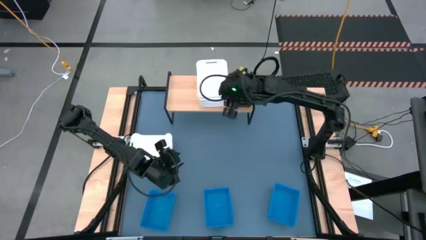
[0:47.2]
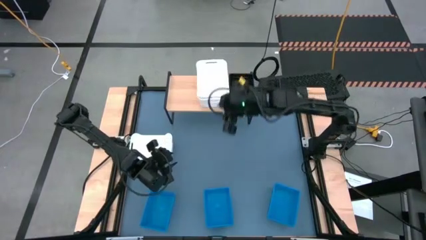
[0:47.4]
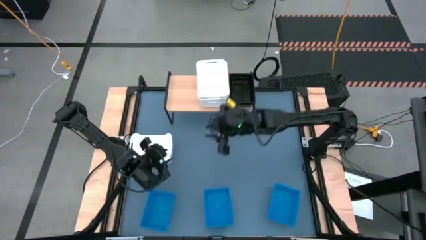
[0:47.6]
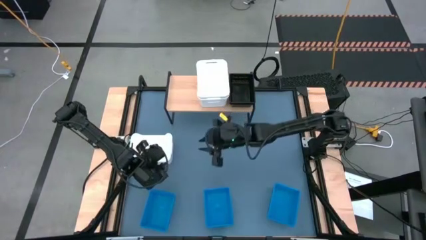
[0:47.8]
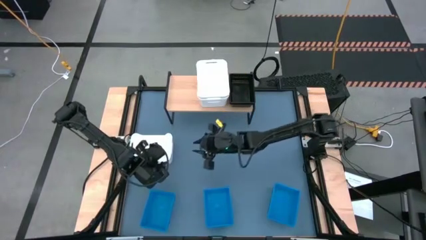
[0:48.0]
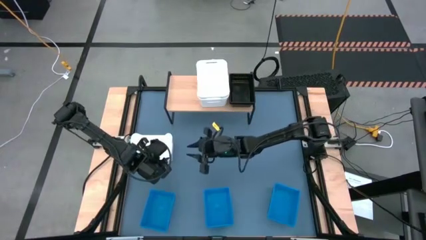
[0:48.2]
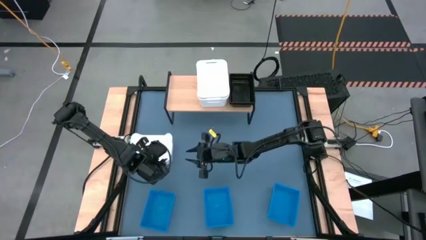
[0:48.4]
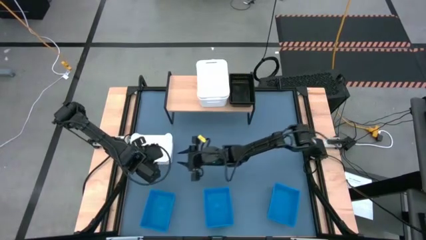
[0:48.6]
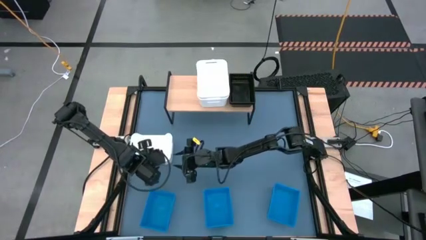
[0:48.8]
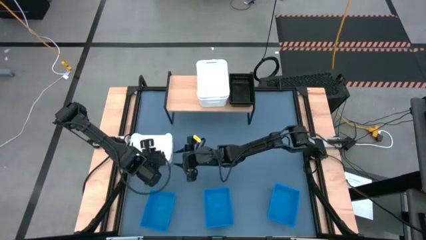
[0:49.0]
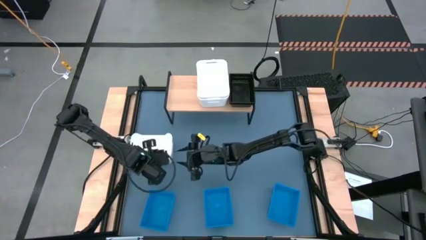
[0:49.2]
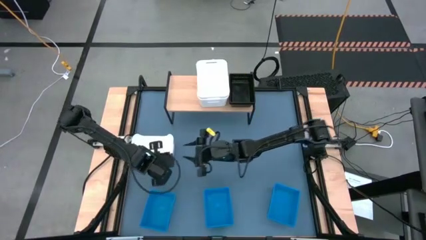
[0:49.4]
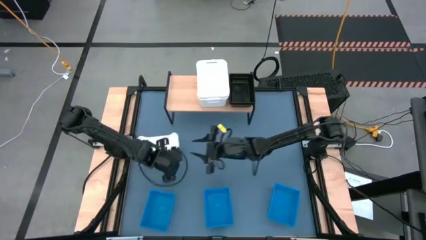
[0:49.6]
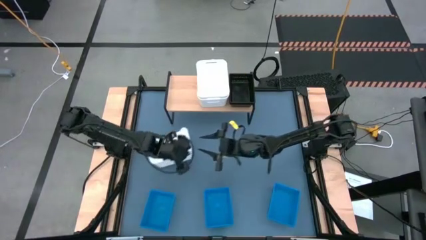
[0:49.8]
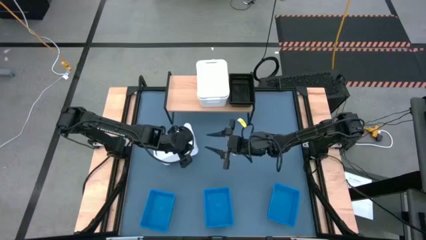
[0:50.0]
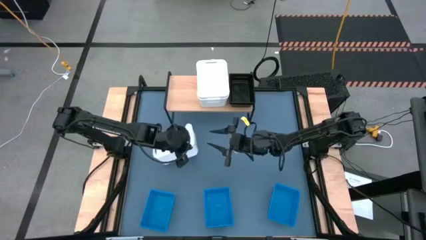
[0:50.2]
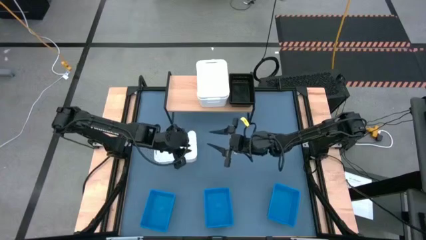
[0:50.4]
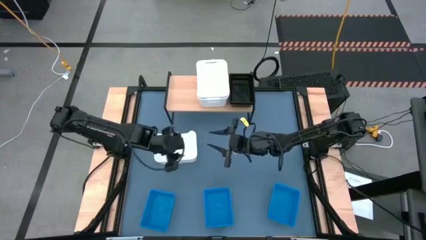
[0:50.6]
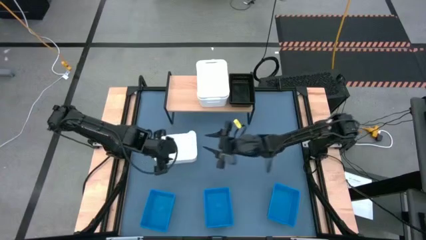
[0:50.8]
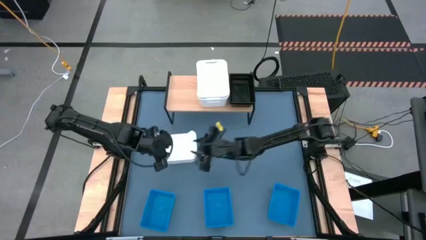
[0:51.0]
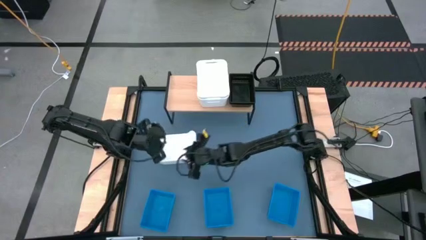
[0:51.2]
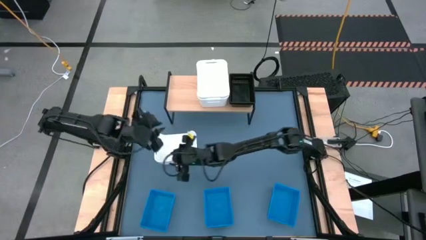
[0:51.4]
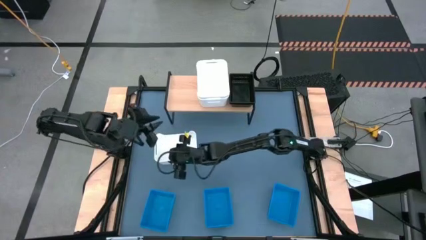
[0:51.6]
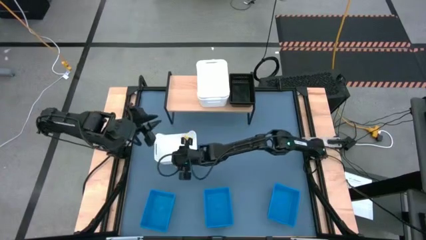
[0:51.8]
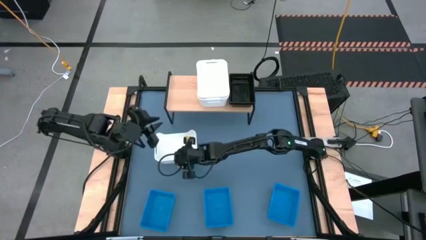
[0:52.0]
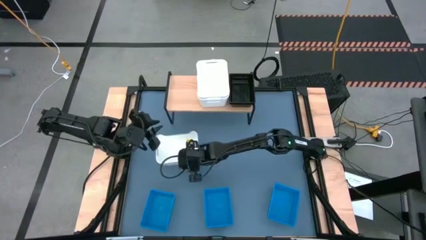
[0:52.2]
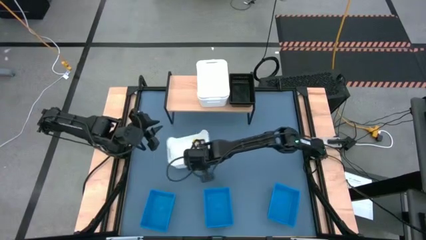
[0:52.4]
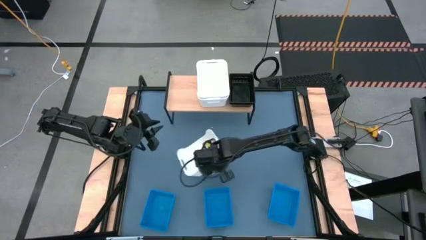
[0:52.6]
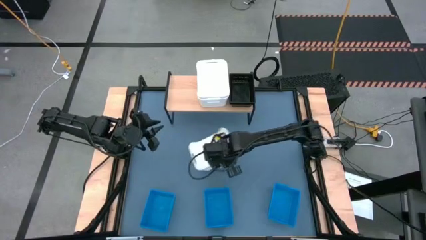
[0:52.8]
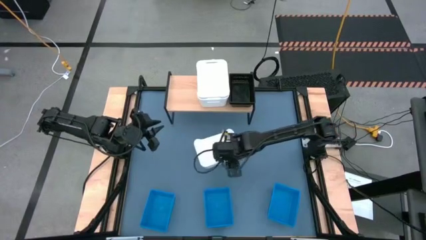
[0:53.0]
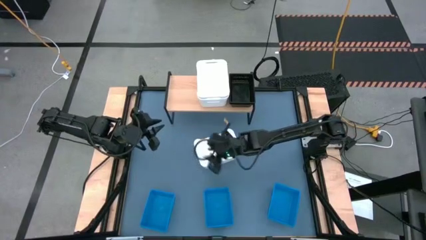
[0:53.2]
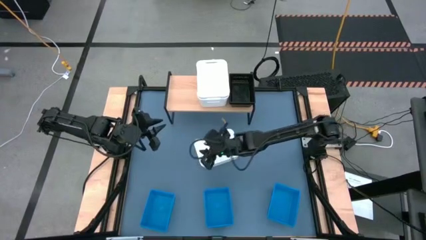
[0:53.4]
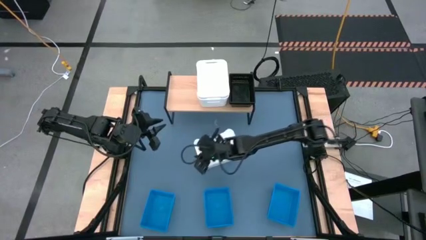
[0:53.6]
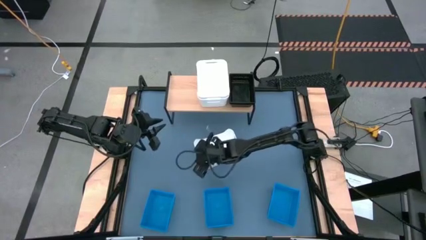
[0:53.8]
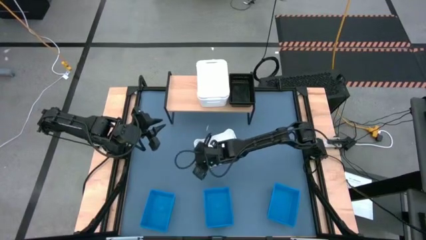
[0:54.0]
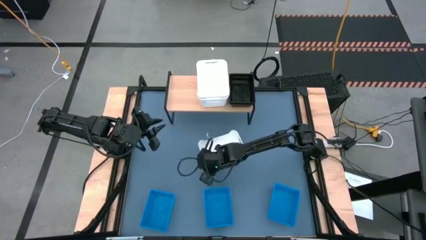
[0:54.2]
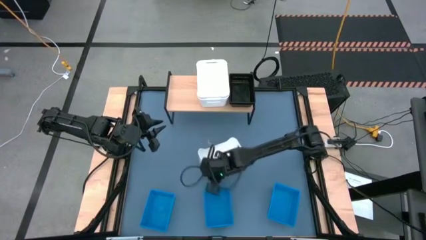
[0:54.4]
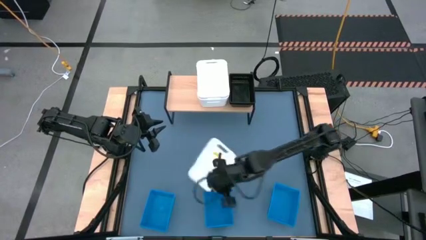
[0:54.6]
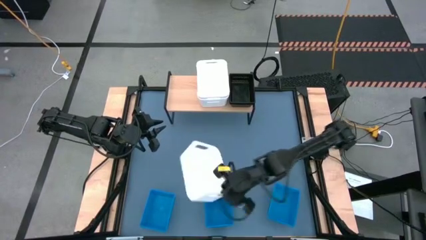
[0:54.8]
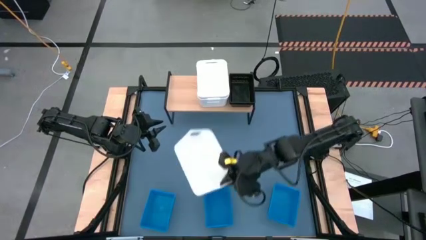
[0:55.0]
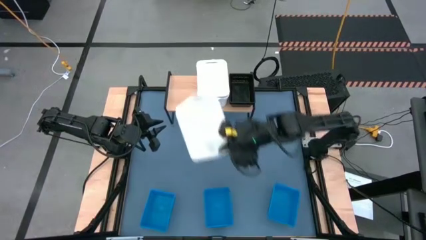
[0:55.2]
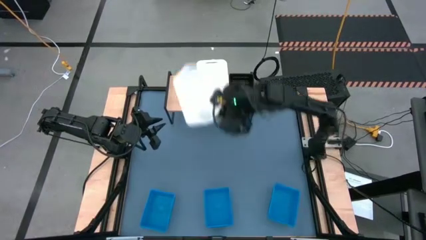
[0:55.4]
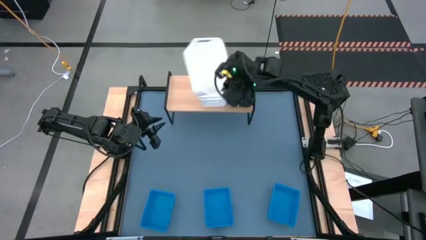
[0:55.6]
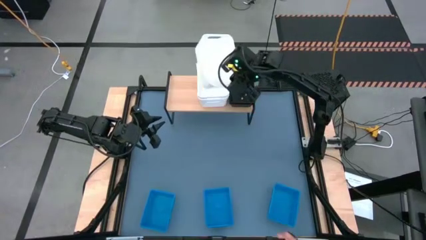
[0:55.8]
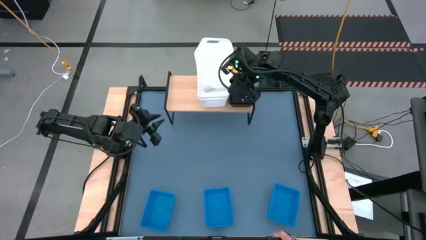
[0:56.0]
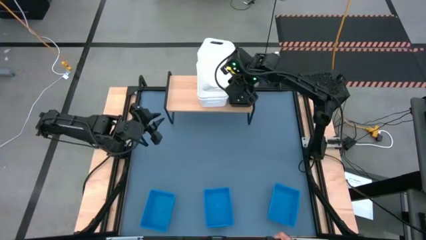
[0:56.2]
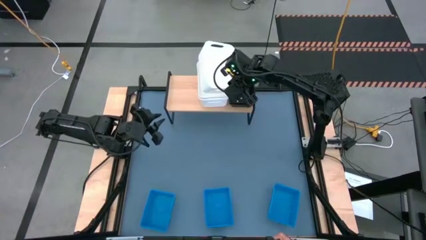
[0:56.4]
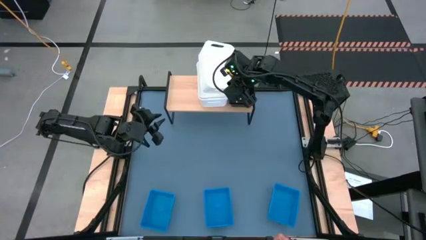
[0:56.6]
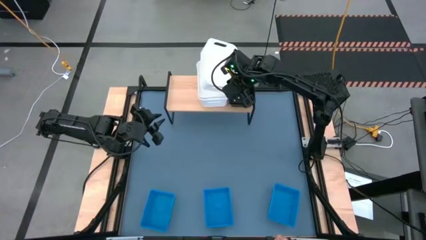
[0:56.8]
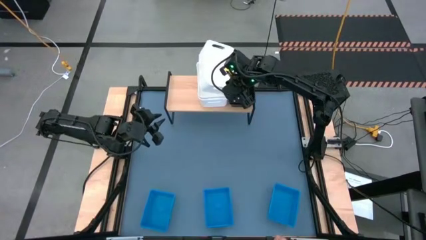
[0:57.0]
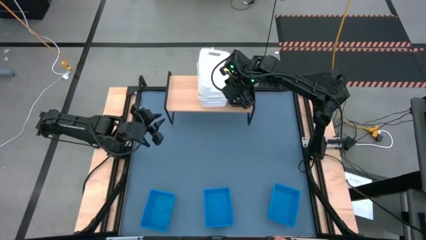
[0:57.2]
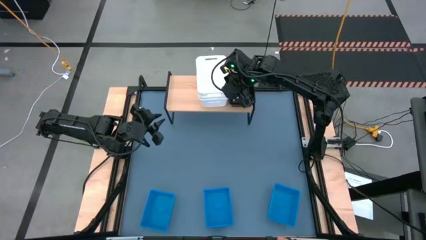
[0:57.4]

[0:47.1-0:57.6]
Task: Stack baskets on shelf by color
Stack the white bin on the white bin on the shelf

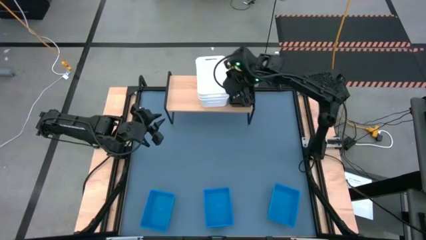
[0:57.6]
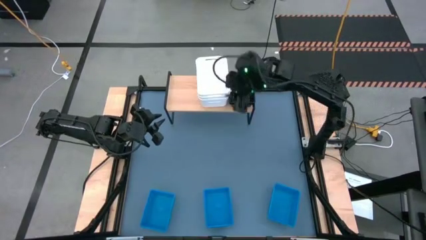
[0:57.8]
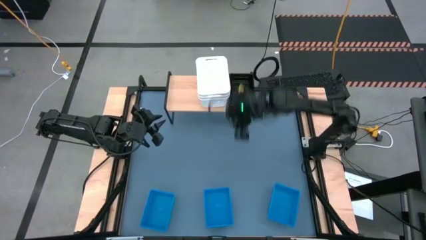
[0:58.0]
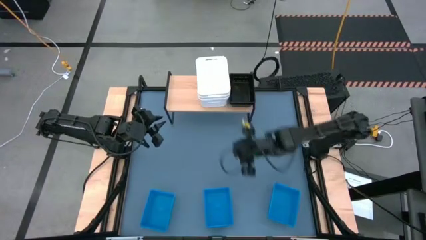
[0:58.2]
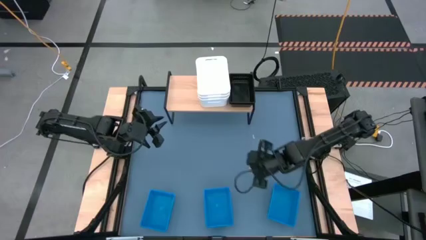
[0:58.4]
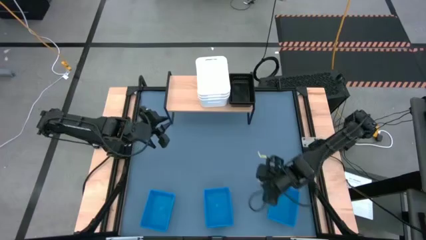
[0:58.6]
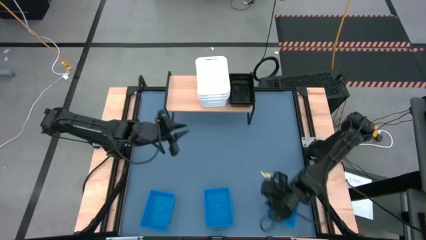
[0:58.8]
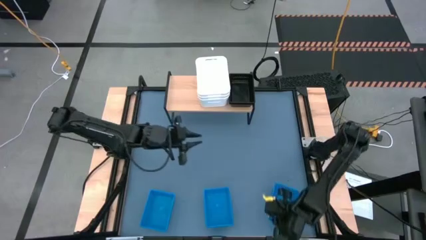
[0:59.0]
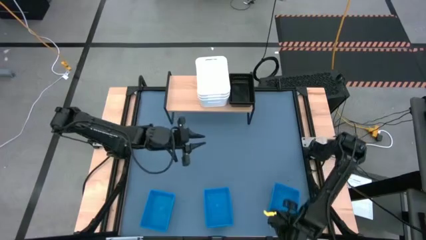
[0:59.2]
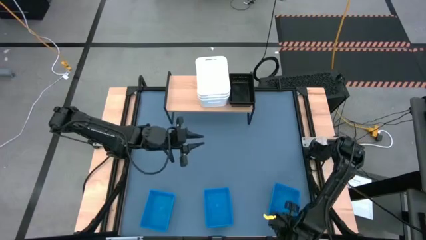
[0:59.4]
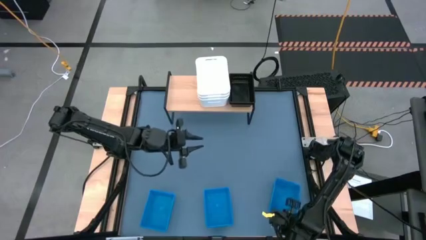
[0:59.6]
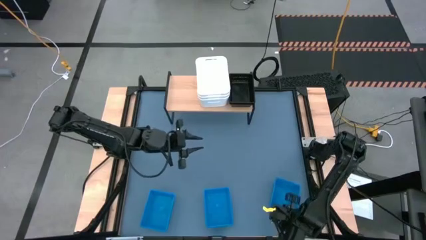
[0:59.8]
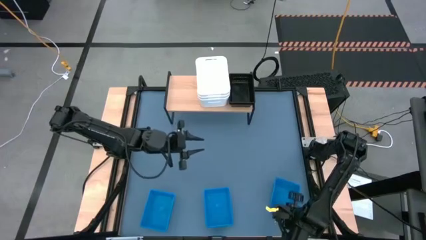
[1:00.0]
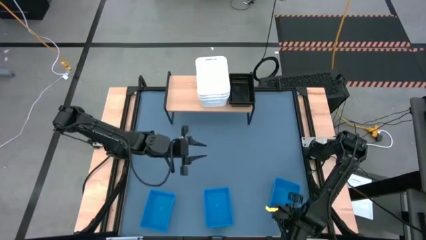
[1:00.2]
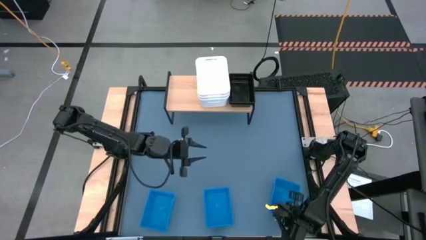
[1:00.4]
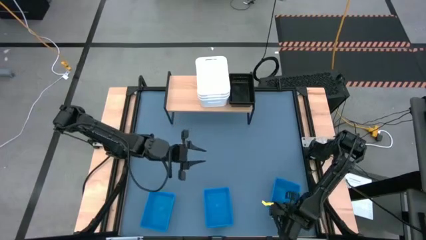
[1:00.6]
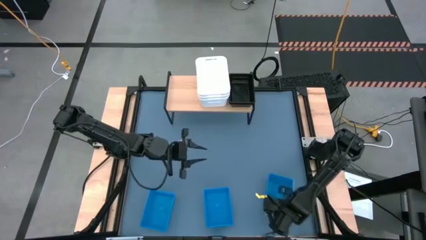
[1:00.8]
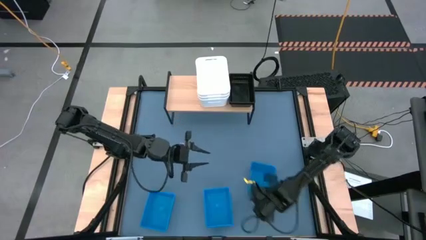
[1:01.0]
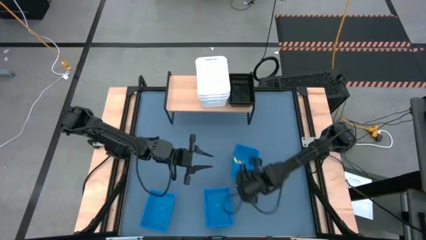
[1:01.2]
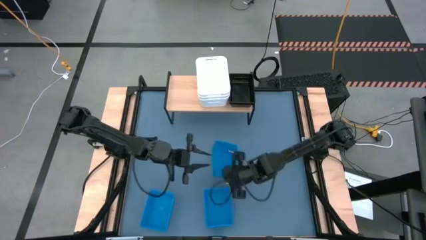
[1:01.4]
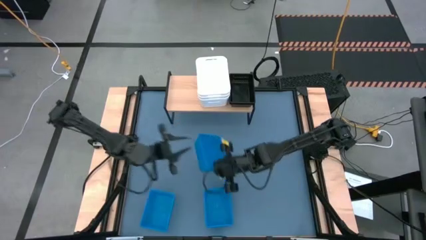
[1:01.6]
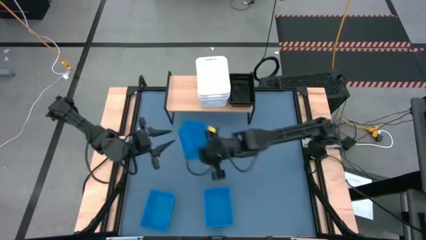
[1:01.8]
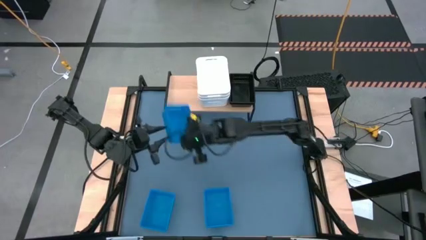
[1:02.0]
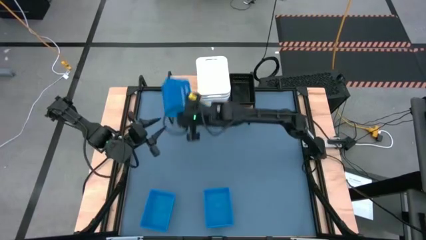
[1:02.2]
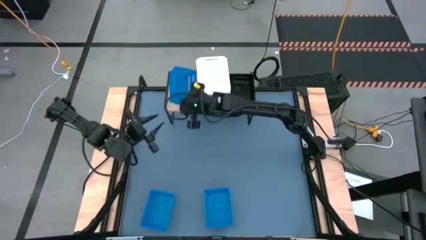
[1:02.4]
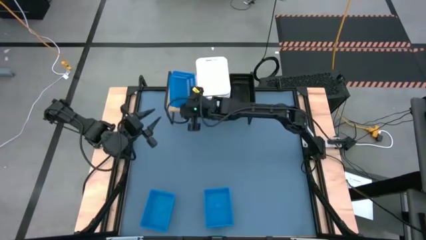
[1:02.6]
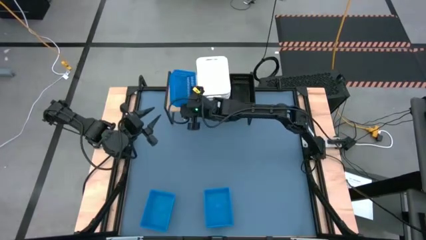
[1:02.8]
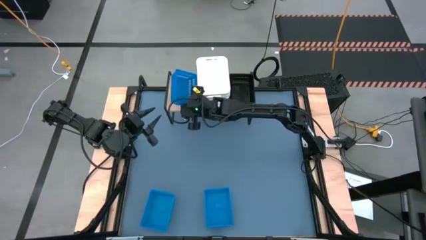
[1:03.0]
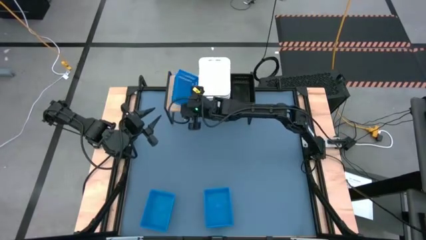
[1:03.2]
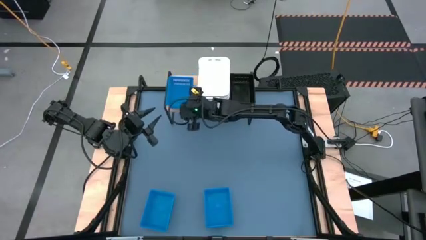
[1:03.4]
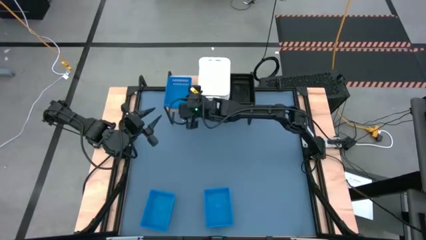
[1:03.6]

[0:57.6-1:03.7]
Put the blue bin on the shelf
